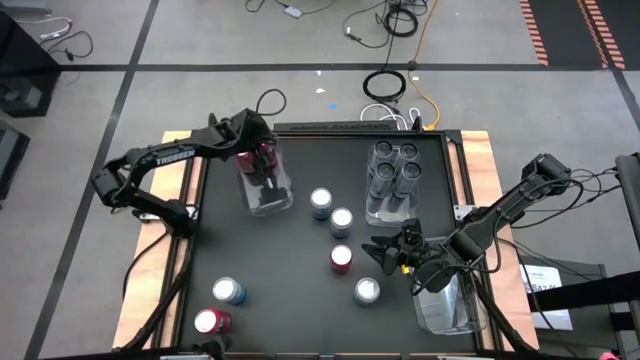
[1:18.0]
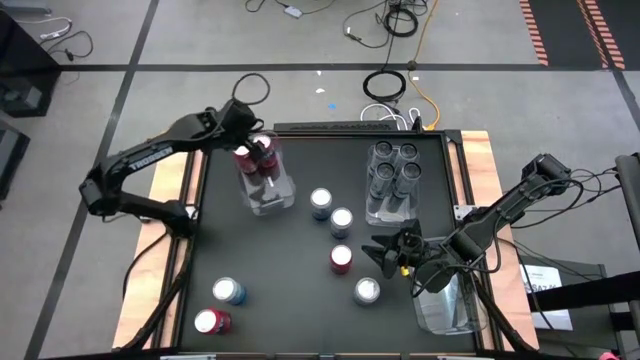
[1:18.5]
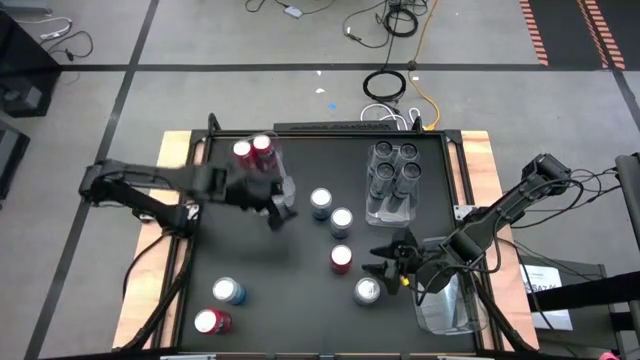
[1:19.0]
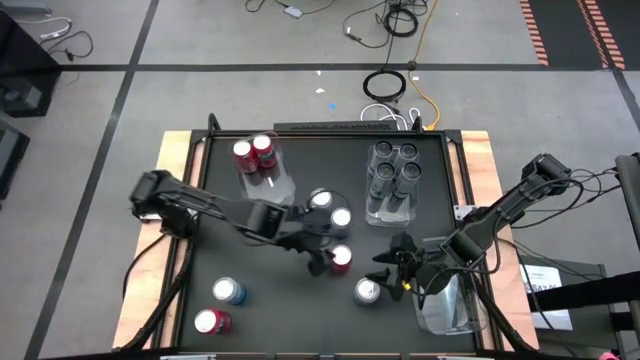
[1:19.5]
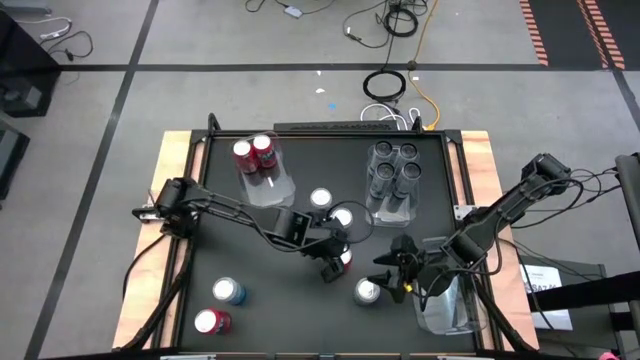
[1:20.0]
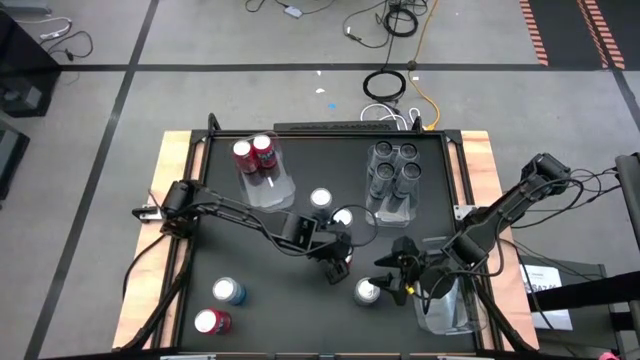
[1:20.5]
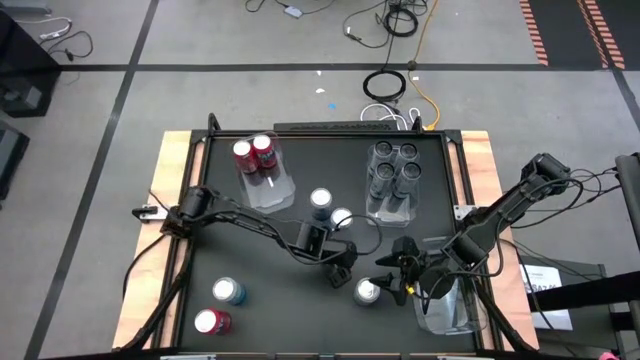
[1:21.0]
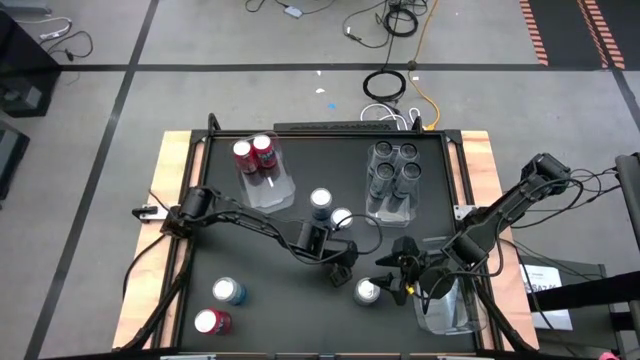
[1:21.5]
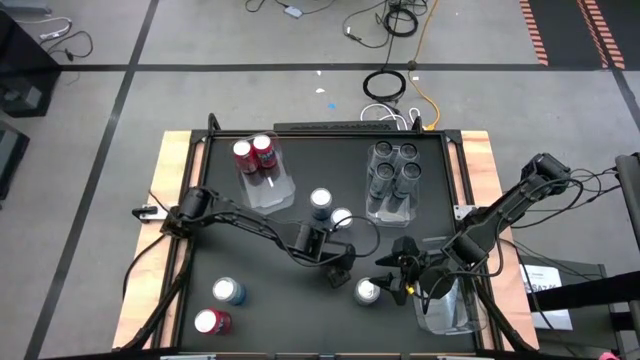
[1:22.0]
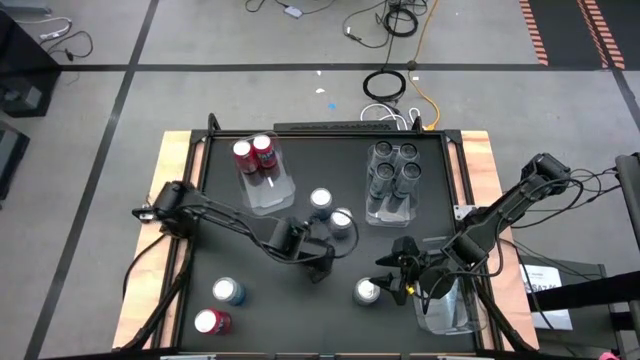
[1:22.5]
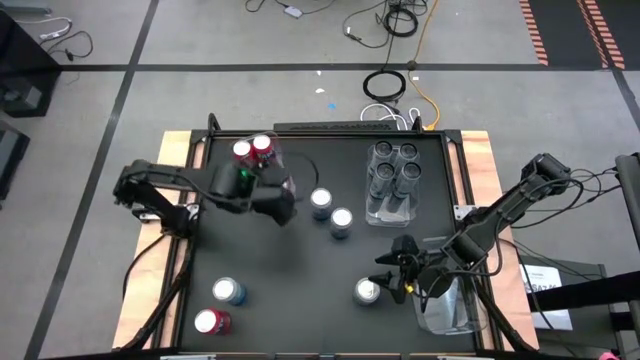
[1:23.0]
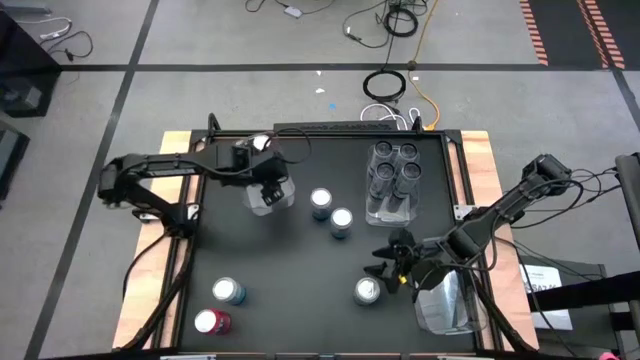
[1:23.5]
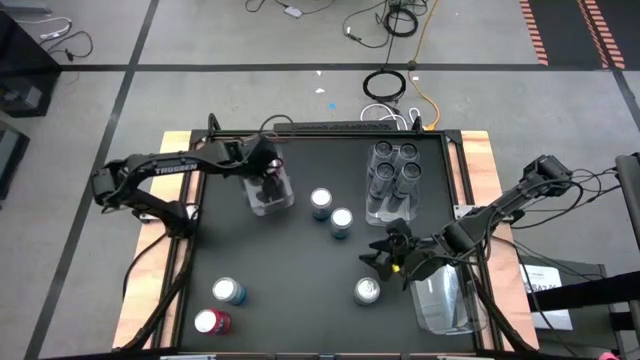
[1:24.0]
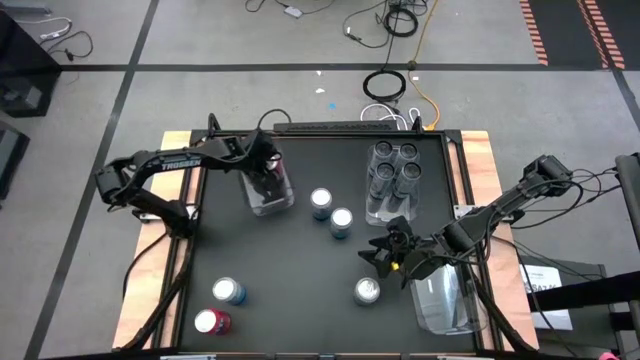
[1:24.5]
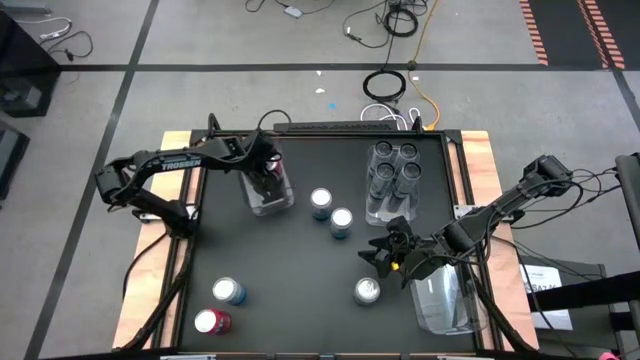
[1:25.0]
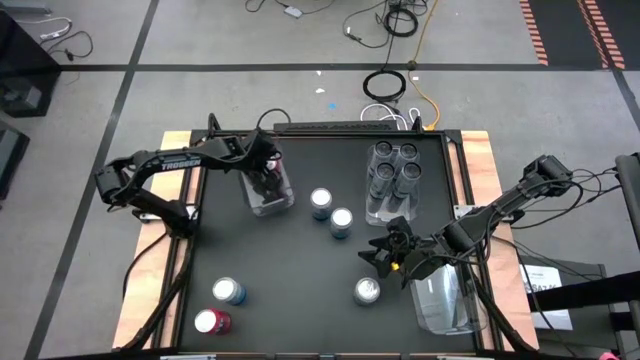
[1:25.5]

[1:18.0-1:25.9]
Task: Sort soda cans
Put the red soda can into the top left transparent bin

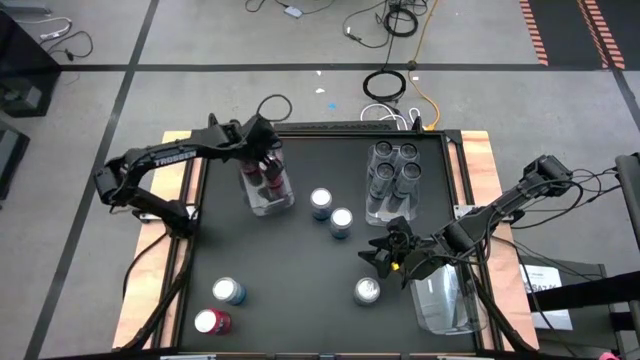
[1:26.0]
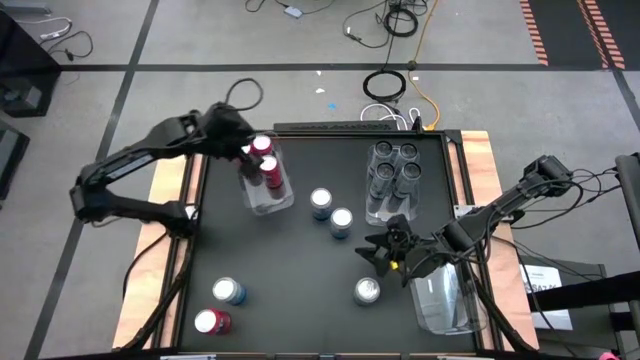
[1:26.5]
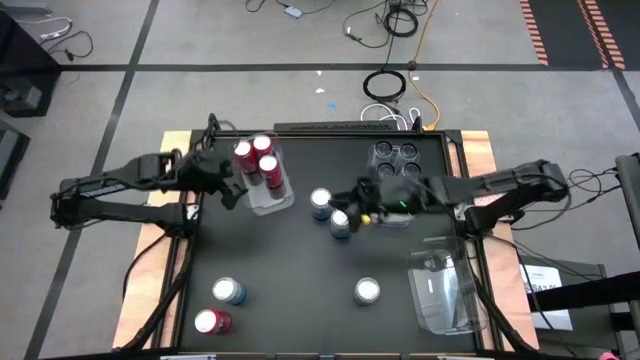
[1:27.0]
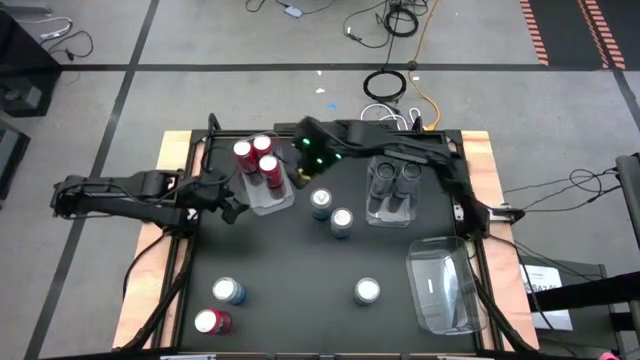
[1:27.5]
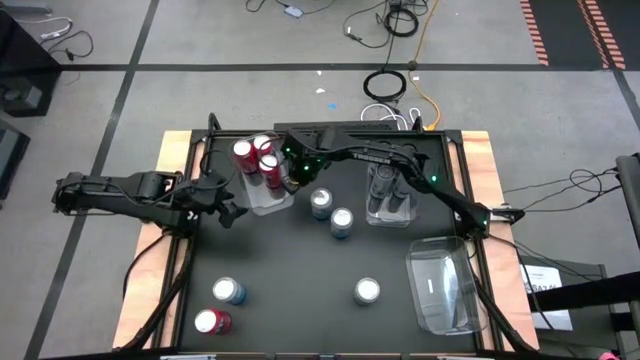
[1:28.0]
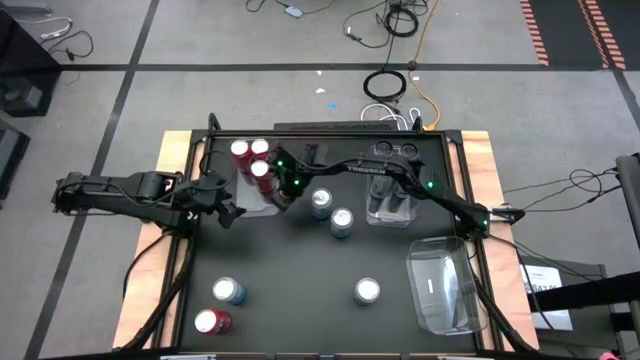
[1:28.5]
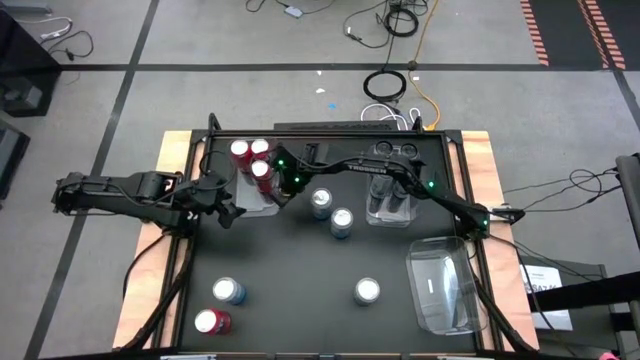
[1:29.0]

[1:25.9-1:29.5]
Adjust the top left transparent bin

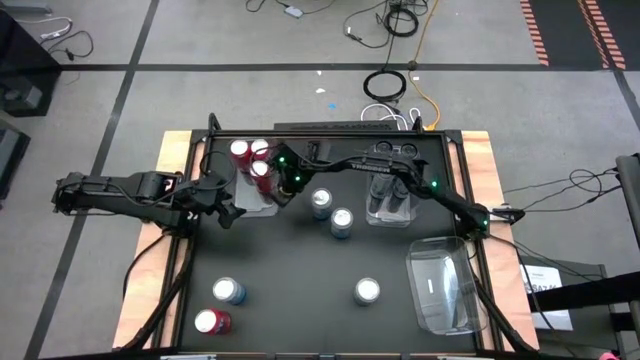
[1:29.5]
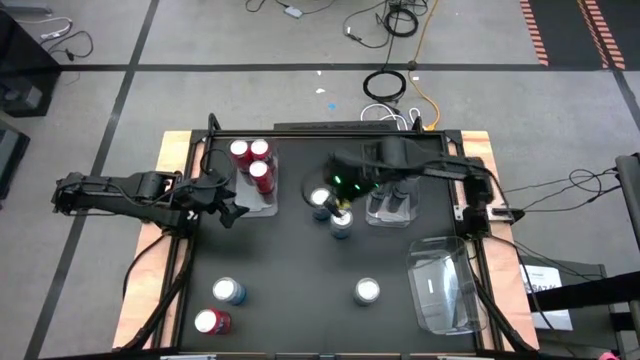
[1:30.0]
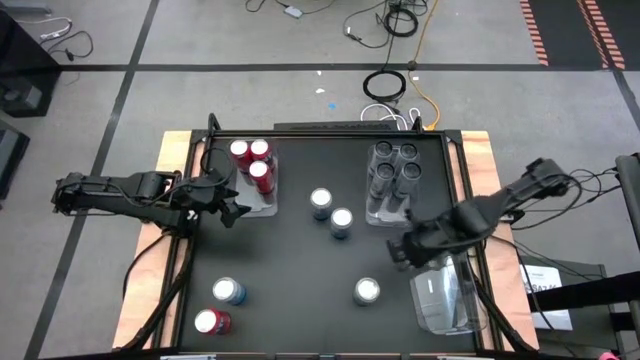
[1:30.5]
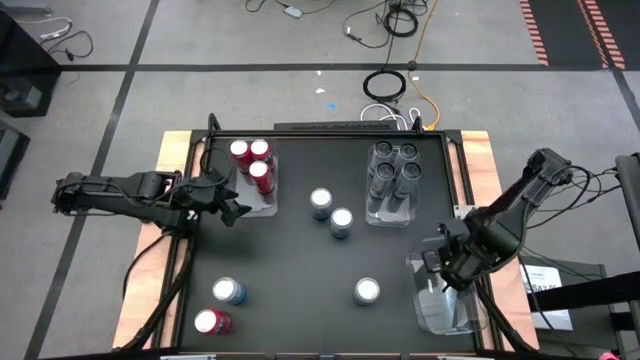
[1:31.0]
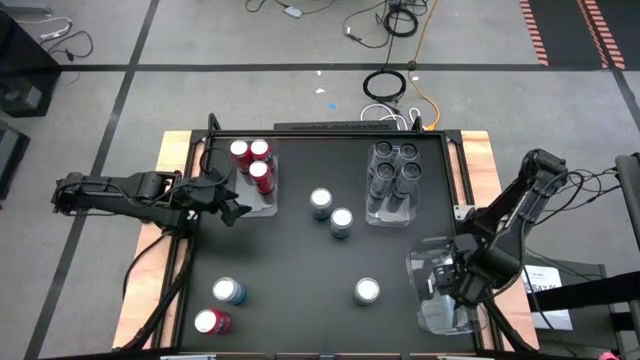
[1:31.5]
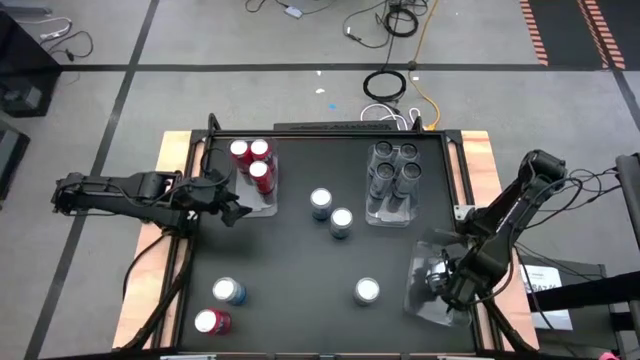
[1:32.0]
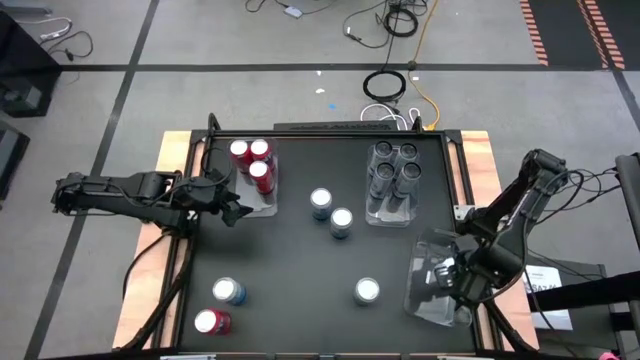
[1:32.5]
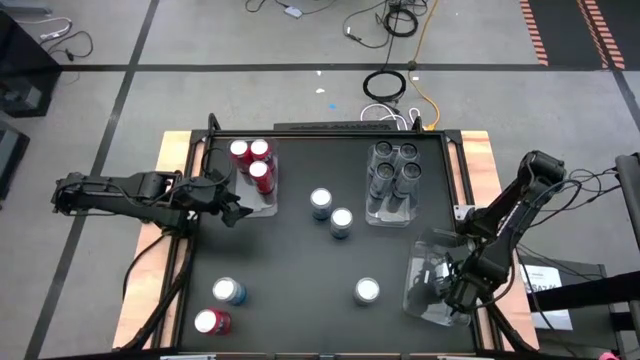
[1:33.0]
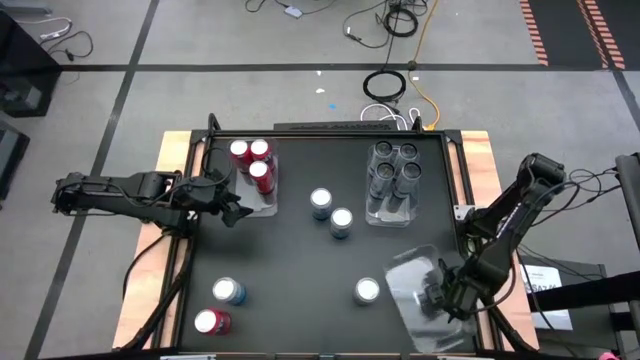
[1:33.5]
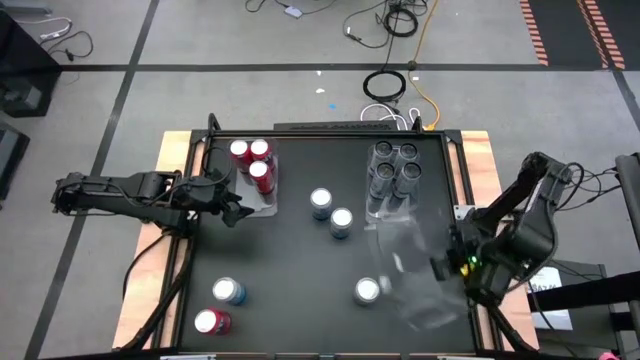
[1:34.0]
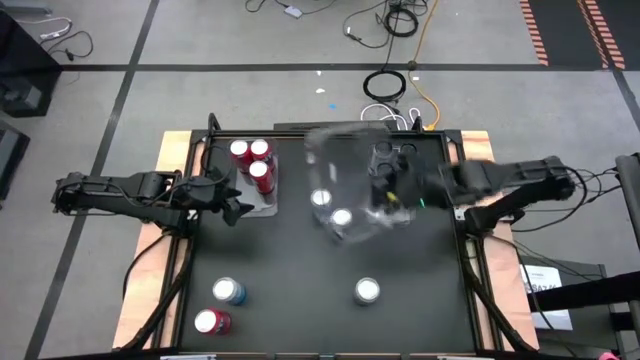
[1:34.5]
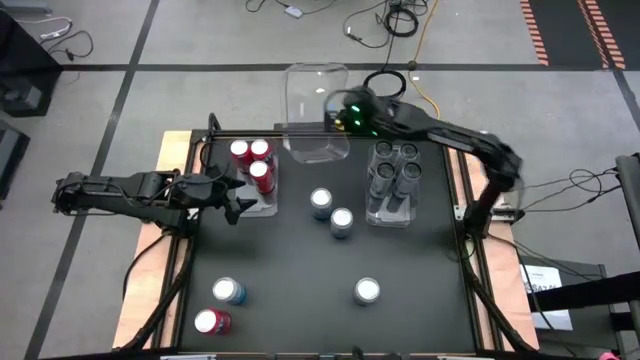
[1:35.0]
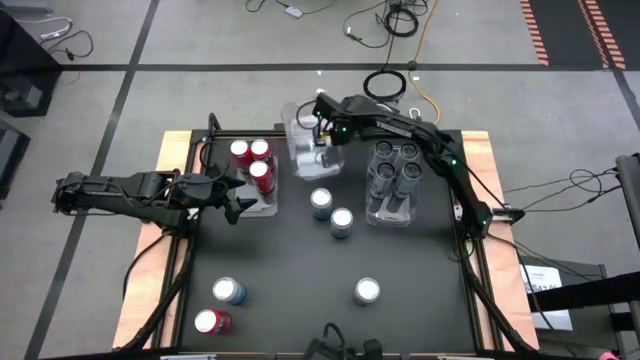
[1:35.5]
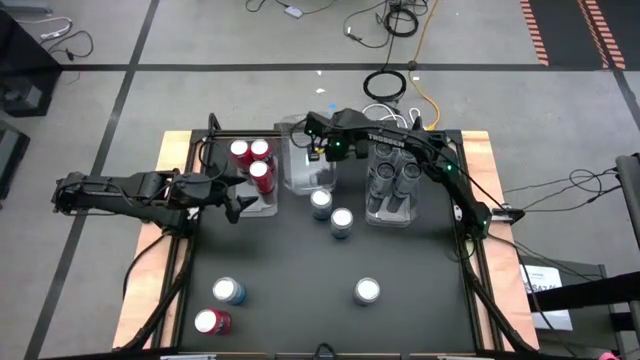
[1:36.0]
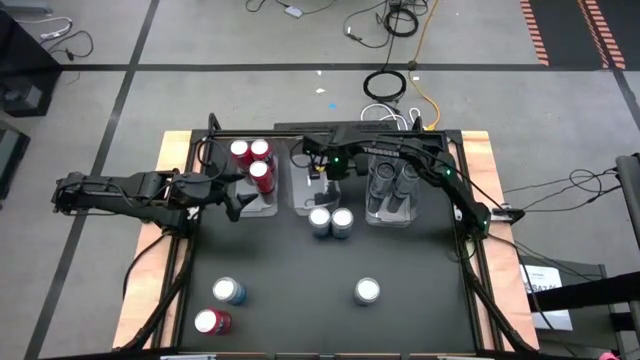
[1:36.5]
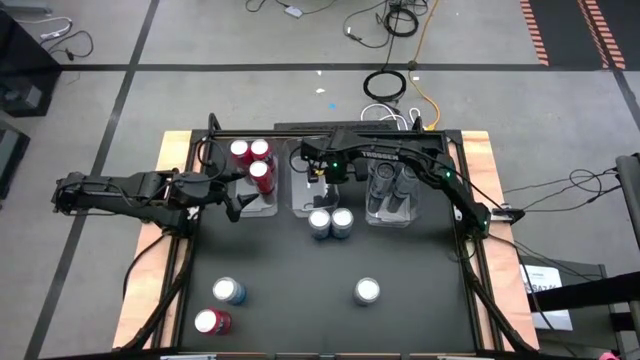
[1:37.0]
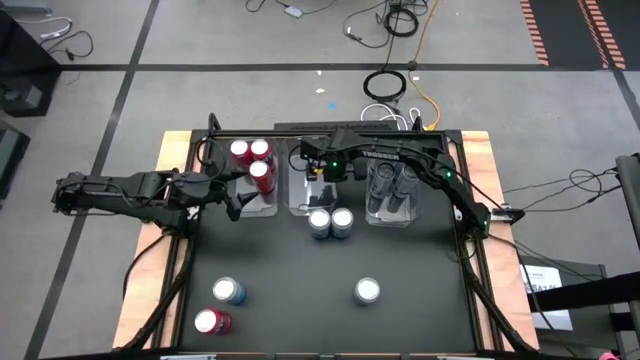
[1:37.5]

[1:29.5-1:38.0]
Move the bottom right transparent bin to the top center of the table
